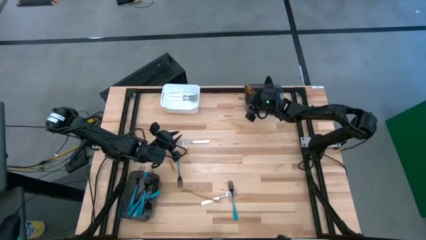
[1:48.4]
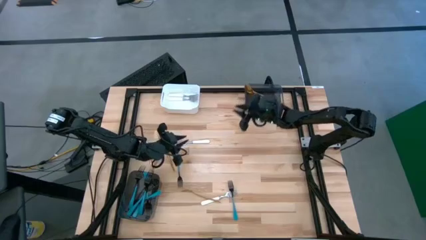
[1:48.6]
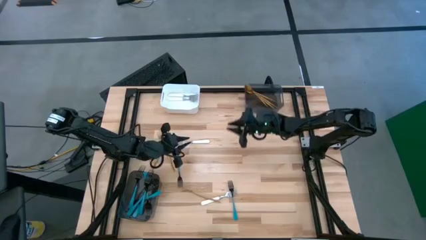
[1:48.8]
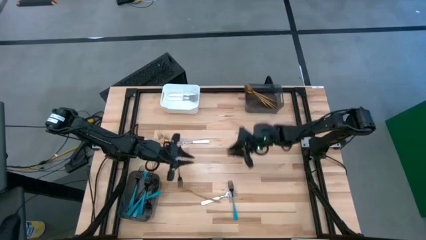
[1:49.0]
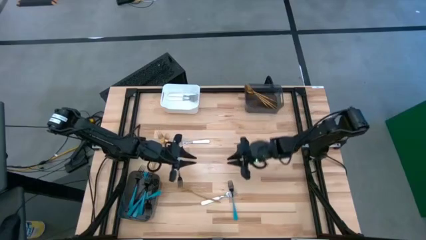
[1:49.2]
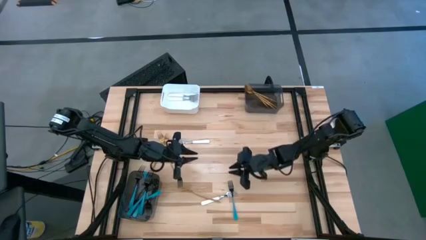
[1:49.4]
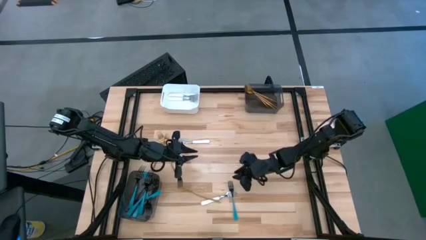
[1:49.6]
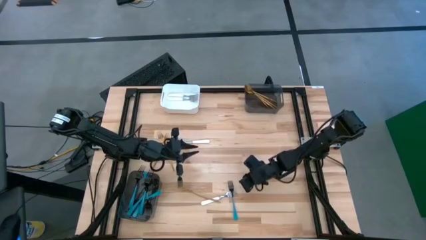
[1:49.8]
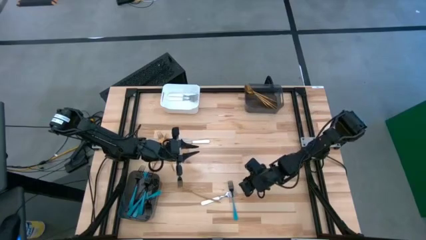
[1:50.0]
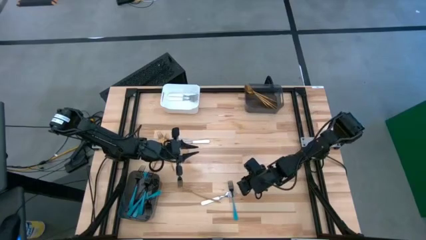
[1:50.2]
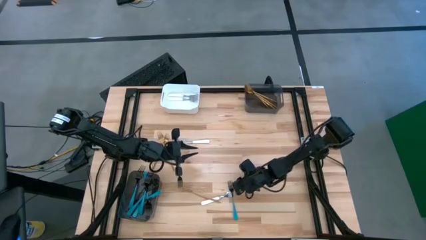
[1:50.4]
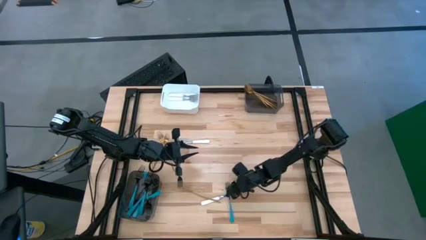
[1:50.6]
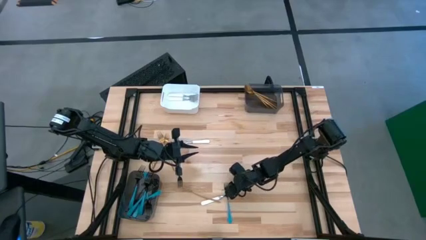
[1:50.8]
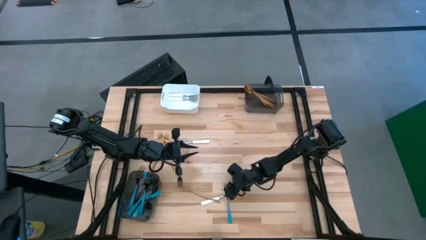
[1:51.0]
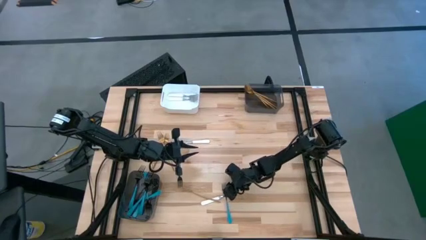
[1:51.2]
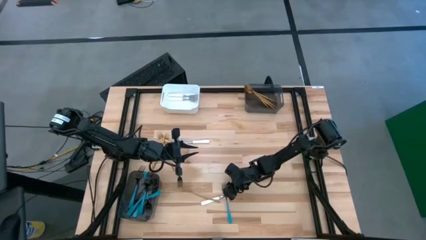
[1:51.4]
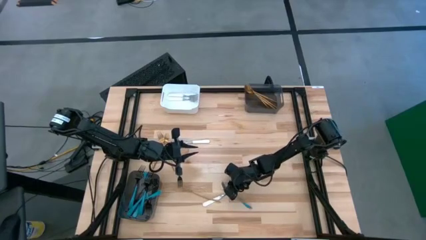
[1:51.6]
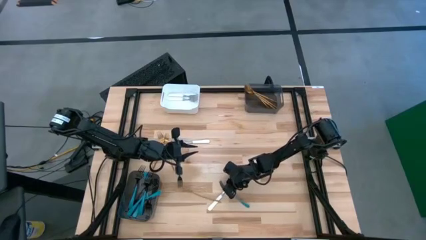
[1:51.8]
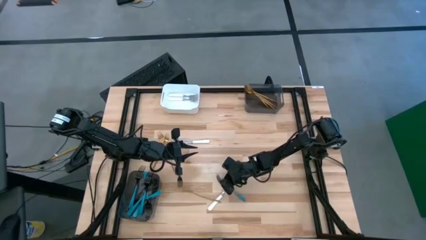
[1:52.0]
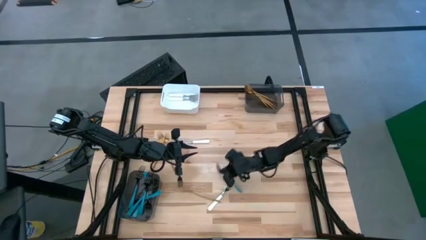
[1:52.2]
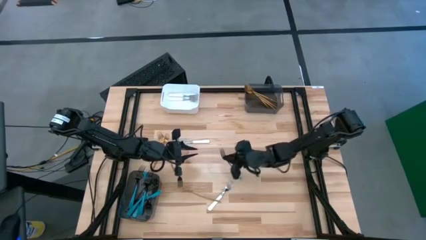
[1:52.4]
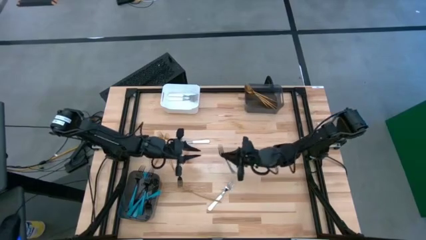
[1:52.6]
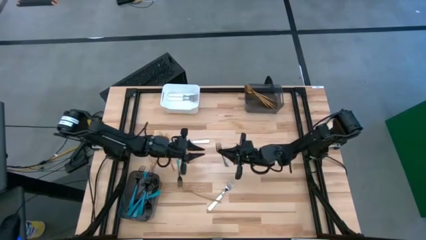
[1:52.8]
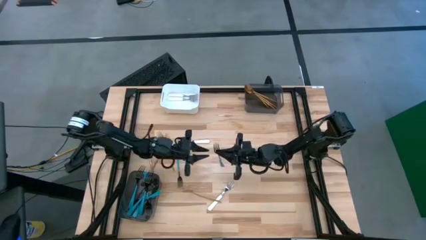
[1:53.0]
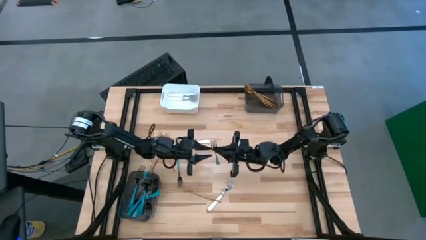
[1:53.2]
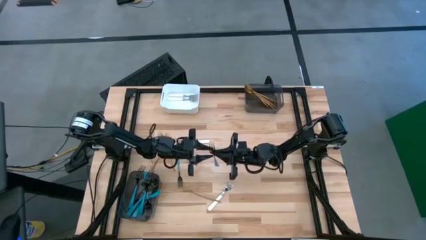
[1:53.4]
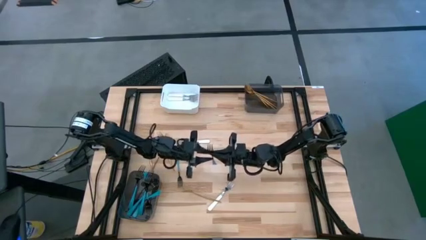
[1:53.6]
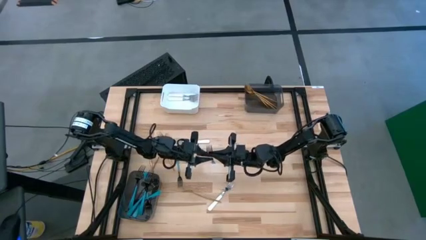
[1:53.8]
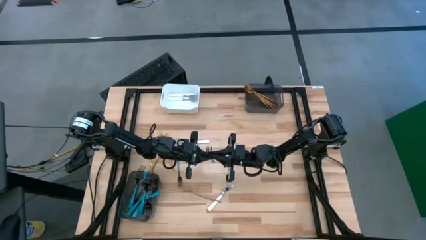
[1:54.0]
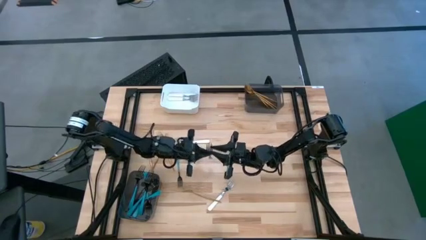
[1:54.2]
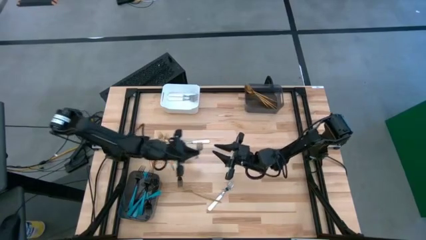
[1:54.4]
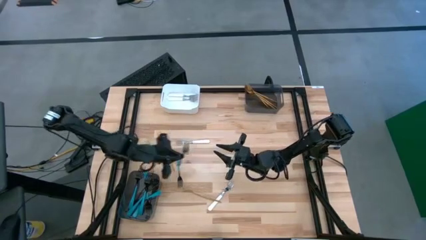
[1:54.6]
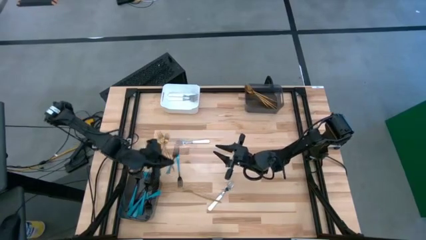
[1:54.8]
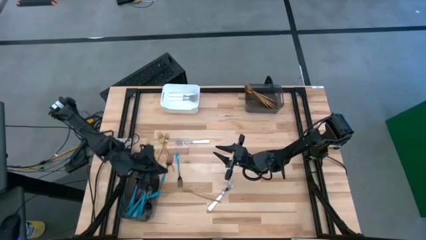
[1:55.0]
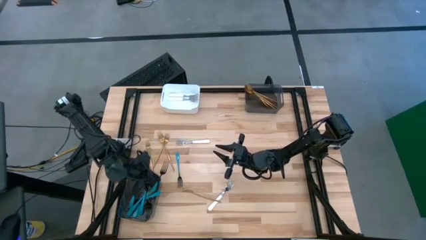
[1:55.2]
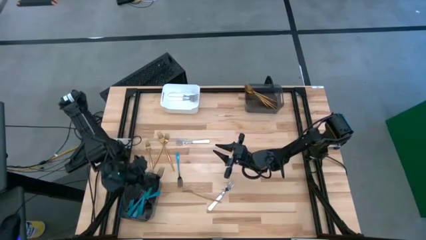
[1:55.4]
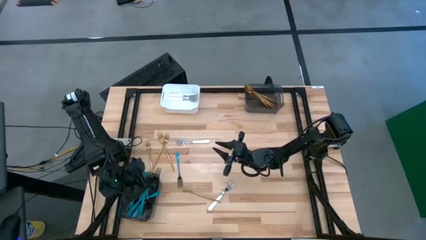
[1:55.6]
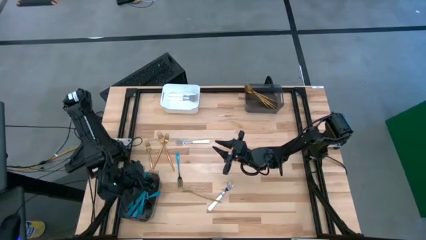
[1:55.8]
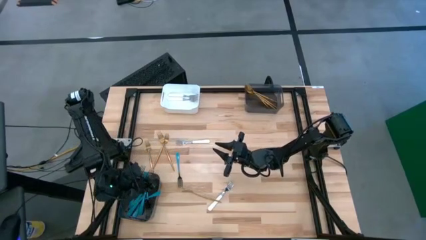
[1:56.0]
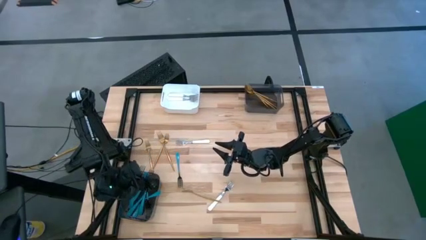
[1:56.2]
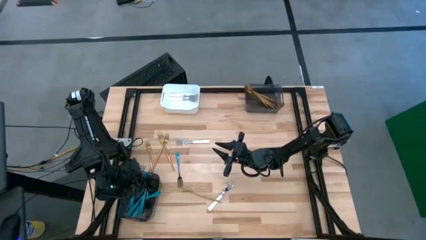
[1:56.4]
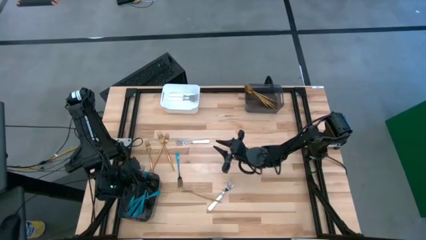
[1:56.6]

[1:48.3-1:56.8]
Task: Sort silverware by color (type)
Put the blue fork into the bottom black bin

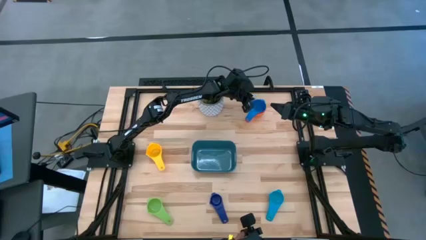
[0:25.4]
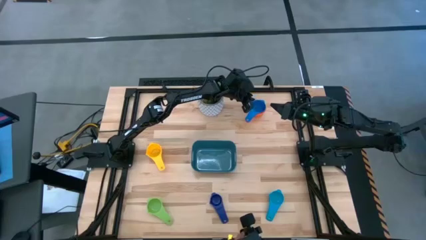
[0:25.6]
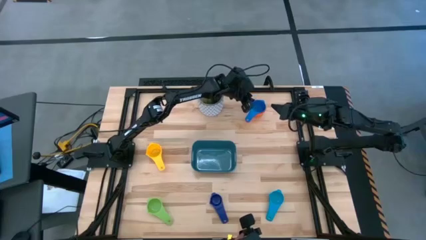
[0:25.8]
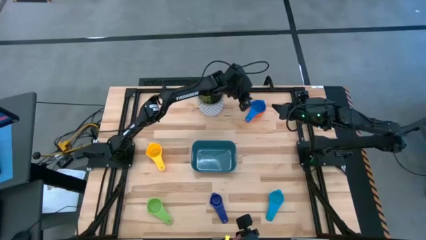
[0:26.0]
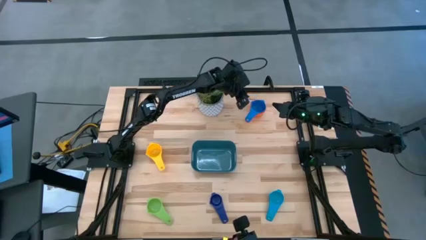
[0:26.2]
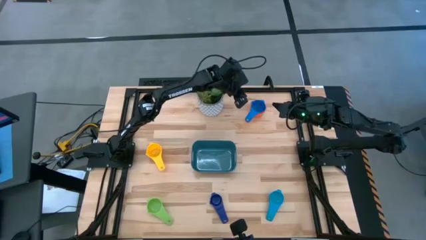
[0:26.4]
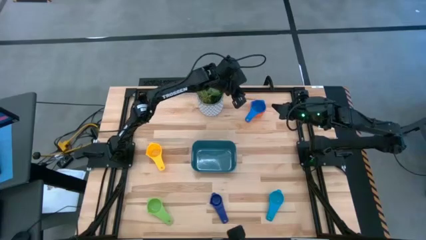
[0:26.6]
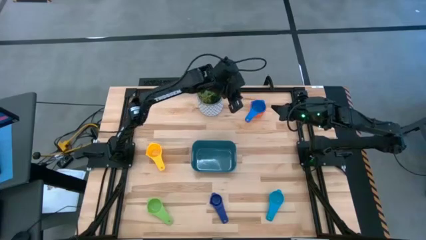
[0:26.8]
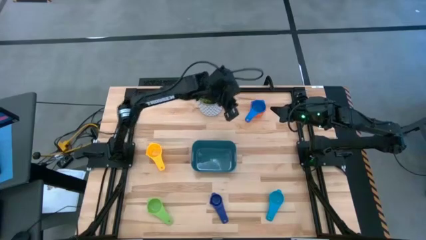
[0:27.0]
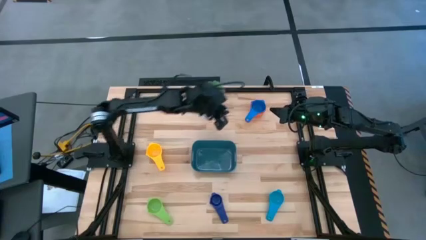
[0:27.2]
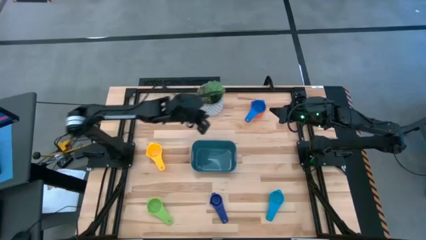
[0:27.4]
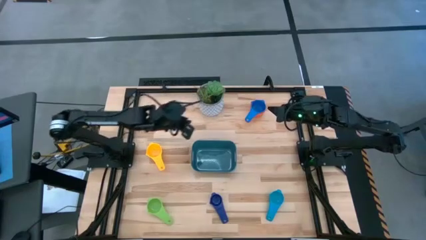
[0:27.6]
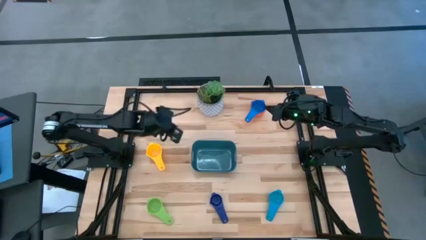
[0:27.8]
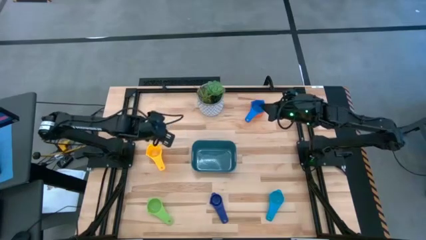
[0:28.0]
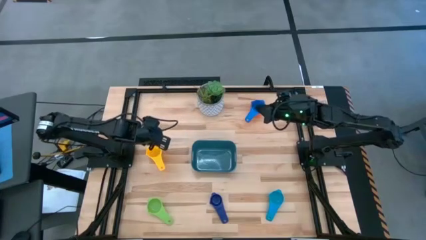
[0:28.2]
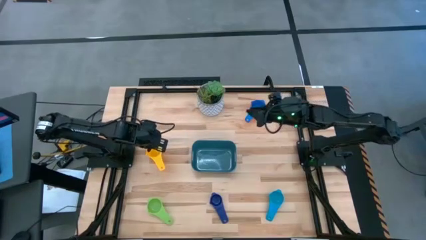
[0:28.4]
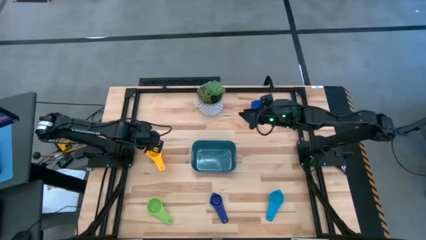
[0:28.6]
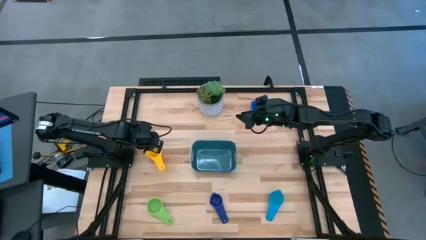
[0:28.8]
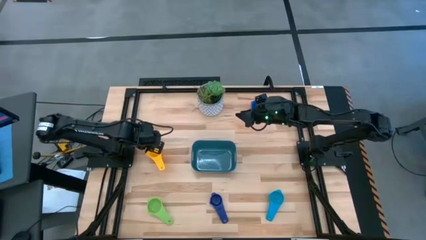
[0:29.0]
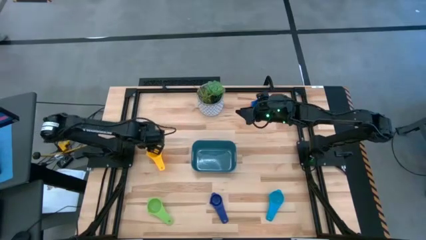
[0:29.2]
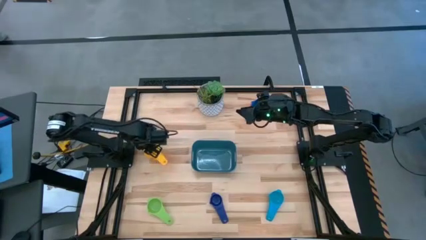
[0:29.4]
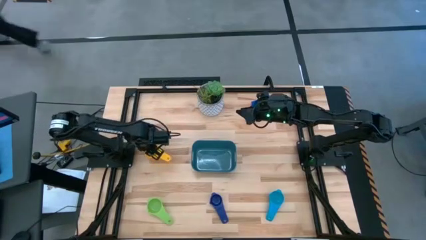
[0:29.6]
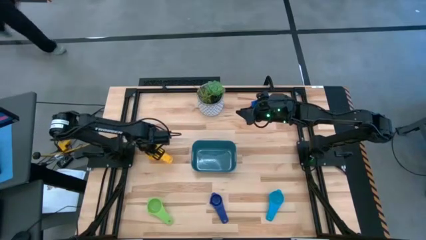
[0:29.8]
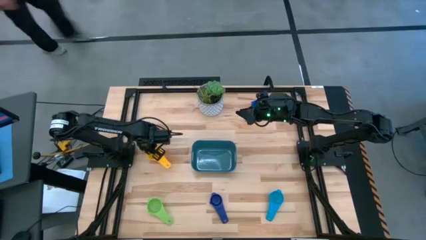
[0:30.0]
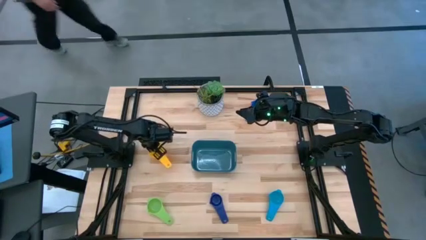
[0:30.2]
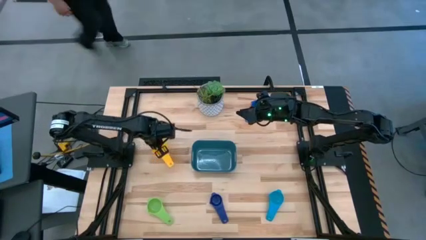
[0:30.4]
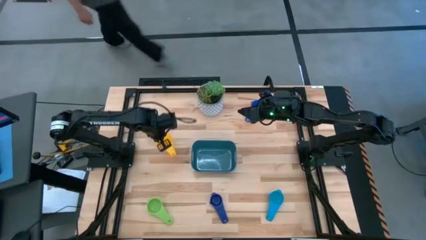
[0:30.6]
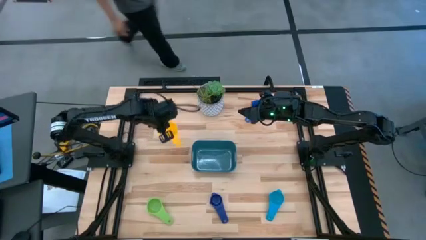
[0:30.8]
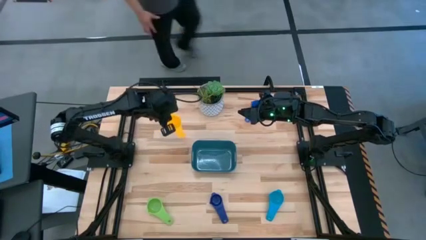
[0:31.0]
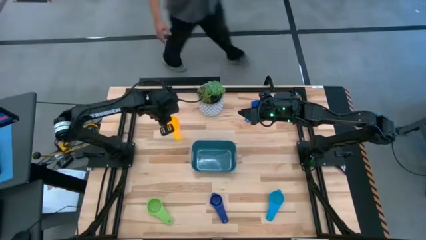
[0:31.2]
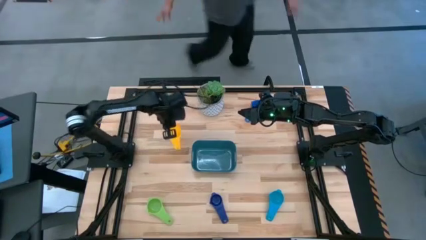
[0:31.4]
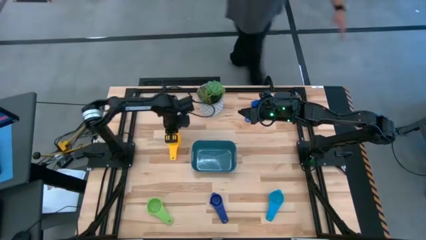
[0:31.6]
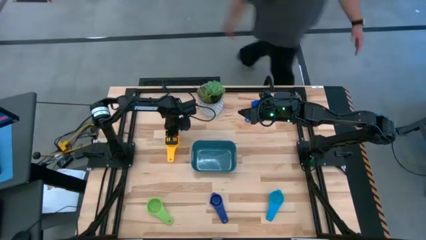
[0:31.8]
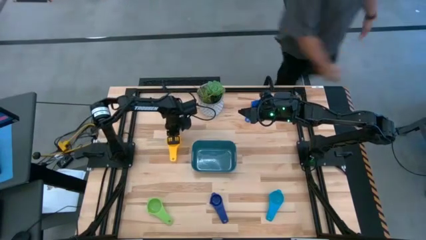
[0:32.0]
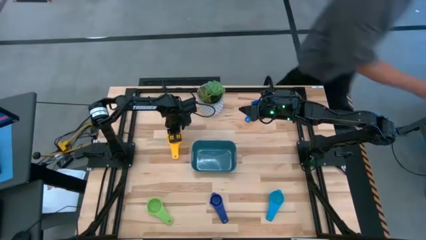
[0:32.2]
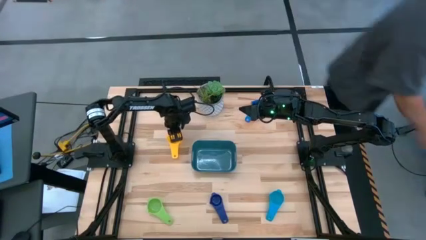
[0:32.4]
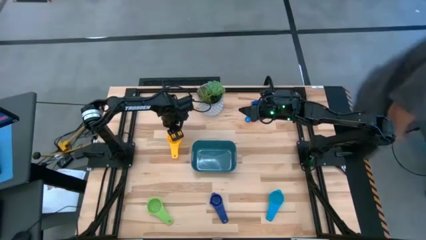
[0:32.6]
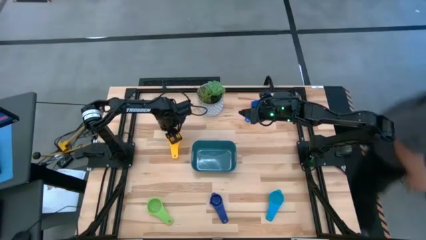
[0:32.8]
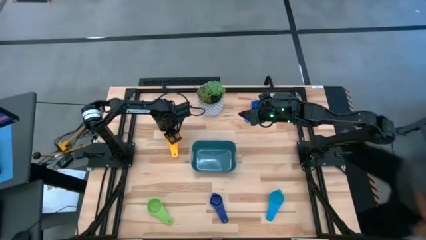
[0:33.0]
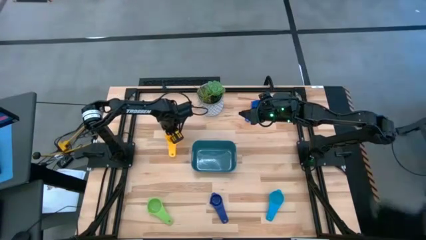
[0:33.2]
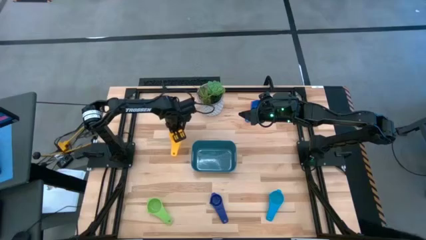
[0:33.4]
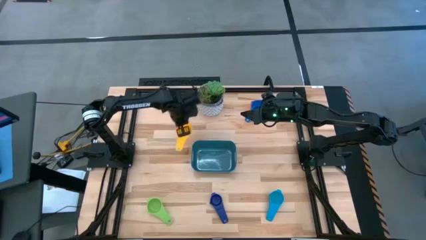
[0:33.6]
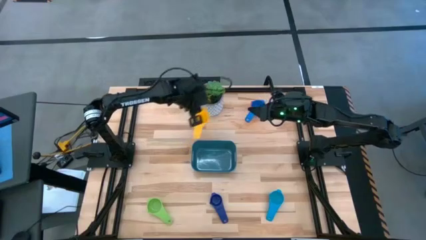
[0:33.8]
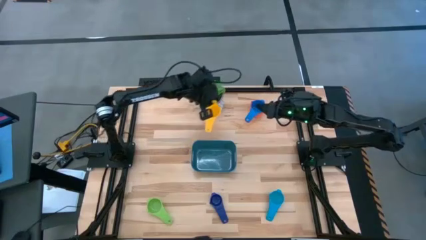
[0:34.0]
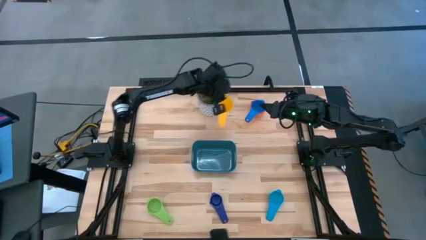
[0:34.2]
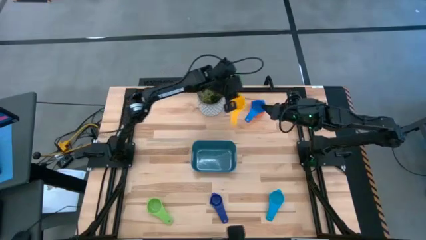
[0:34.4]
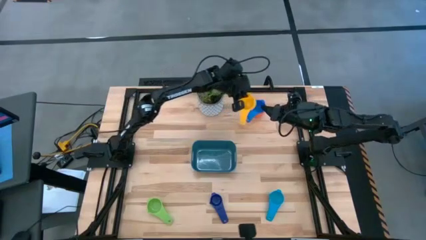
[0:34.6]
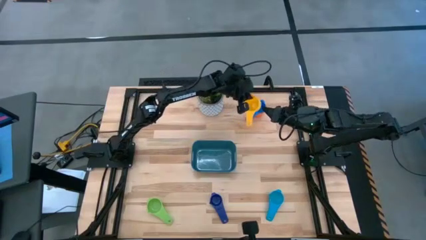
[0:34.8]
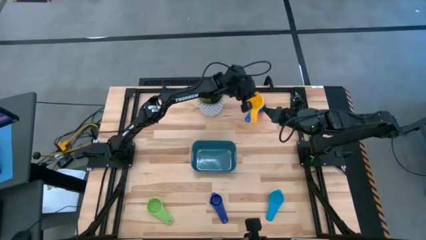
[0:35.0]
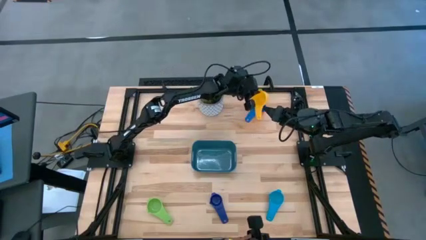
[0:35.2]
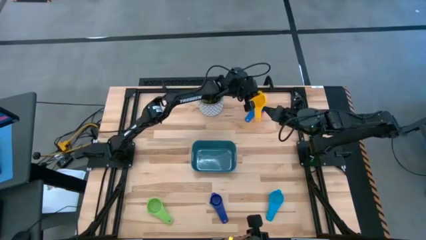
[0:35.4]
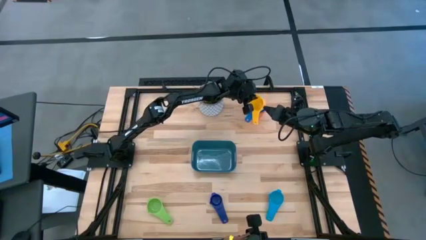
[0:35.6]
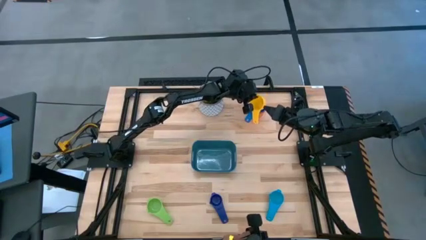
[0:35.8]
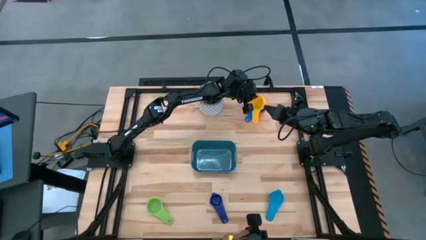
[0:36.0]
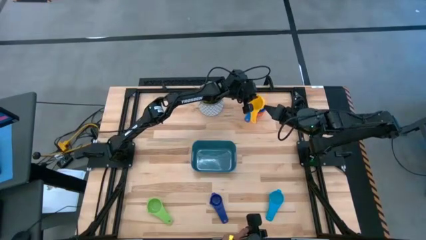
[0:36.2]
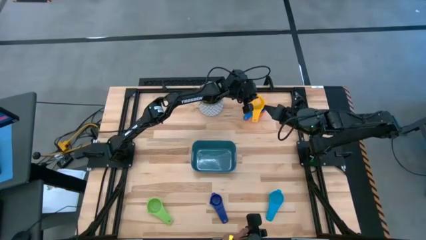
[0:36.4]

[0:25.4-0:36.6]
Task: Nest measuring cups in basket
Stack the yellow measuring cup on top of the blue measuring cup
